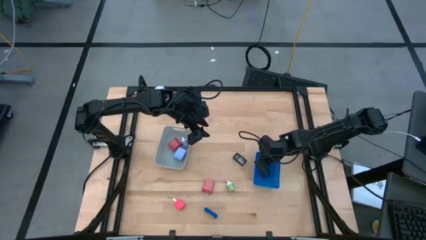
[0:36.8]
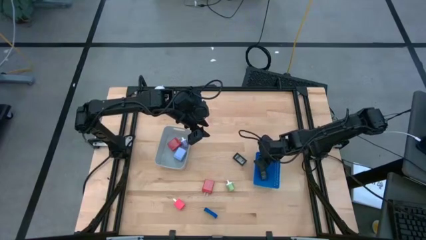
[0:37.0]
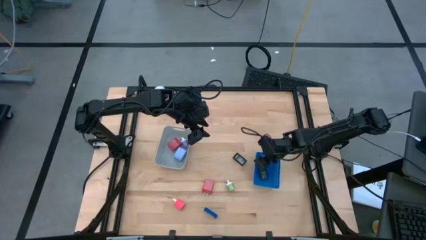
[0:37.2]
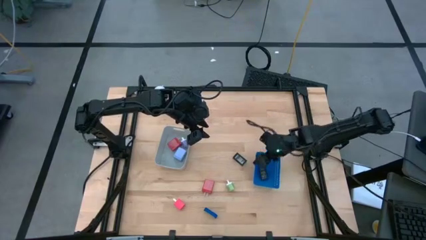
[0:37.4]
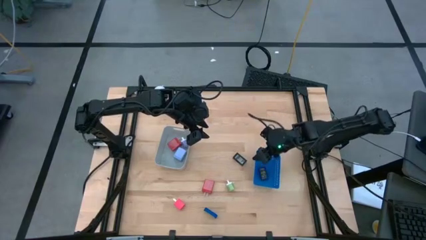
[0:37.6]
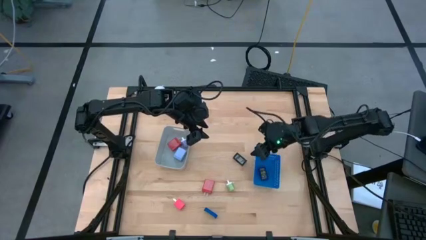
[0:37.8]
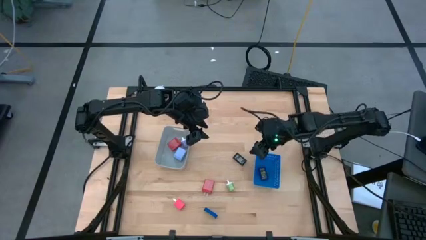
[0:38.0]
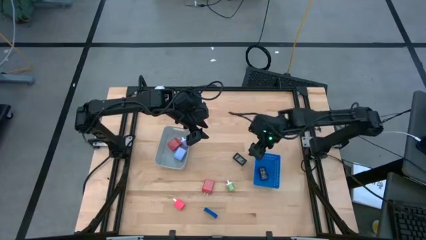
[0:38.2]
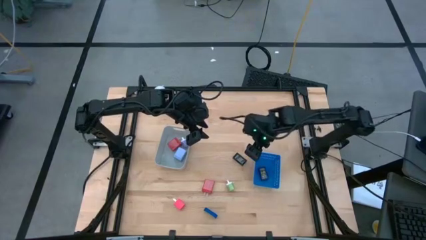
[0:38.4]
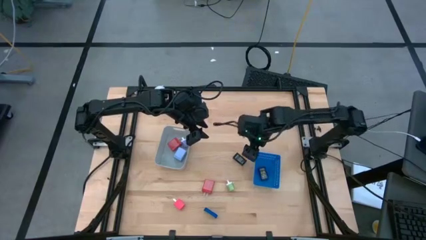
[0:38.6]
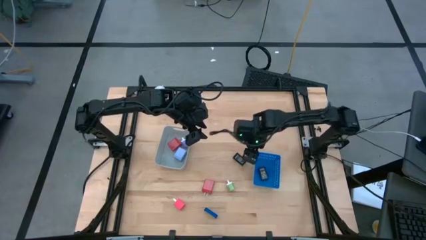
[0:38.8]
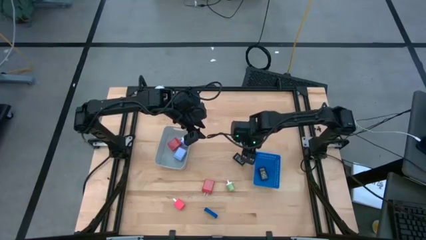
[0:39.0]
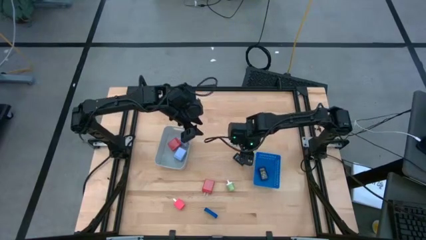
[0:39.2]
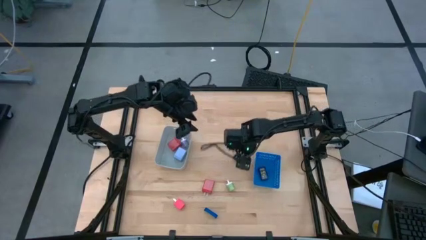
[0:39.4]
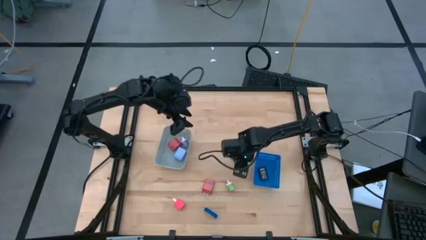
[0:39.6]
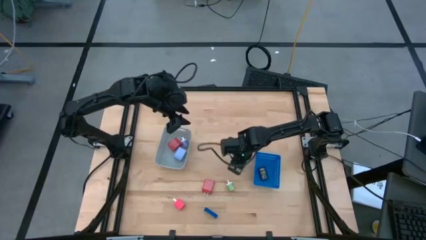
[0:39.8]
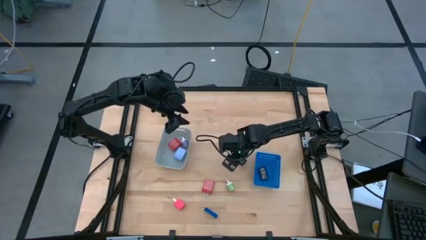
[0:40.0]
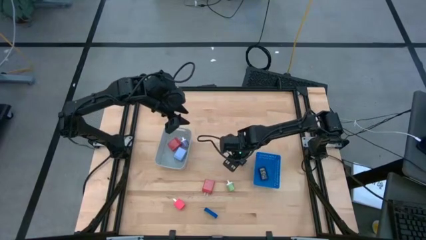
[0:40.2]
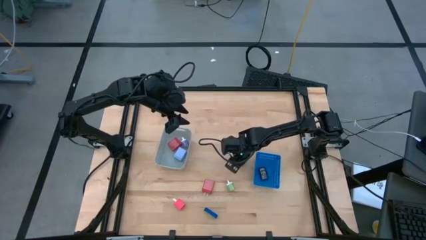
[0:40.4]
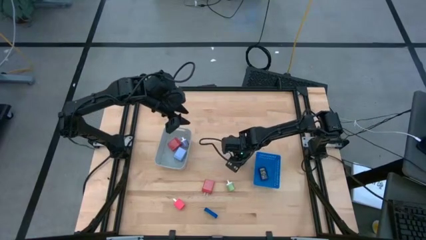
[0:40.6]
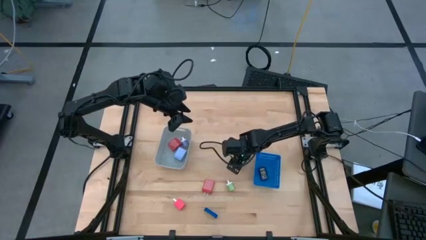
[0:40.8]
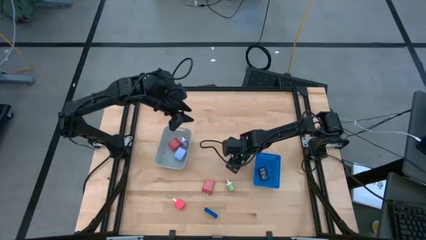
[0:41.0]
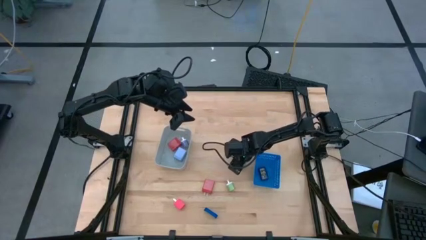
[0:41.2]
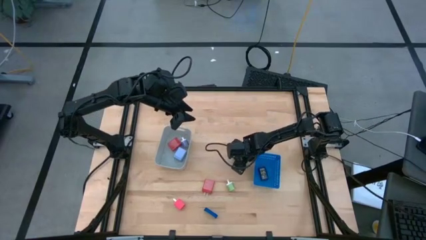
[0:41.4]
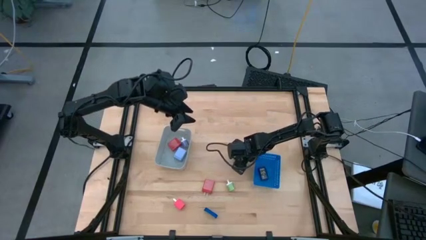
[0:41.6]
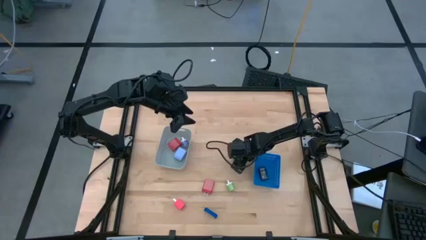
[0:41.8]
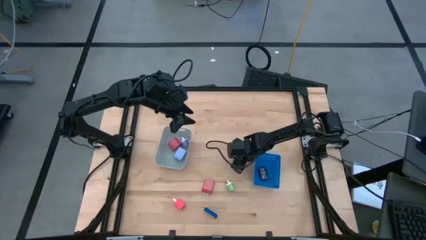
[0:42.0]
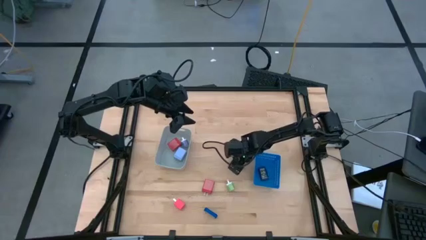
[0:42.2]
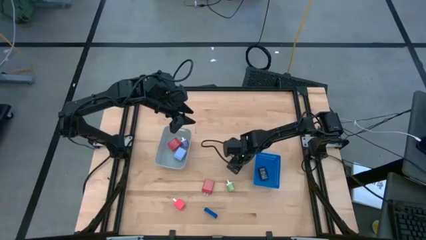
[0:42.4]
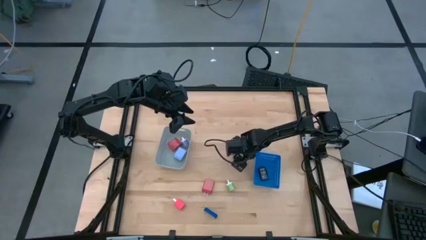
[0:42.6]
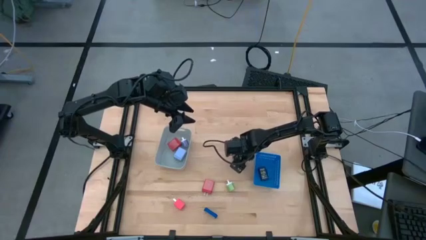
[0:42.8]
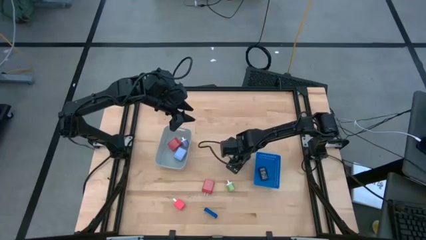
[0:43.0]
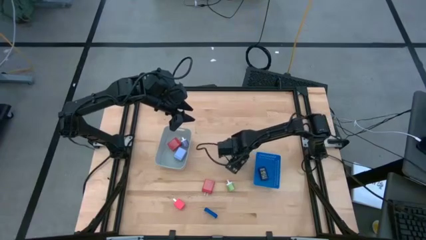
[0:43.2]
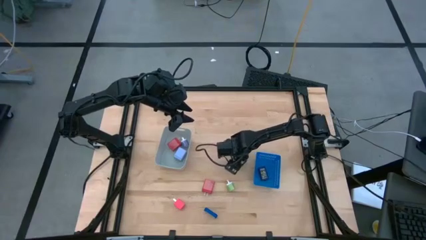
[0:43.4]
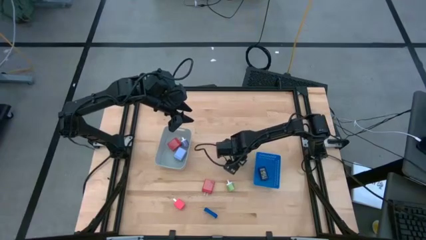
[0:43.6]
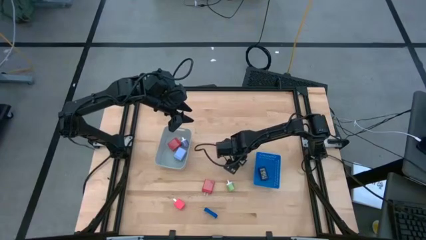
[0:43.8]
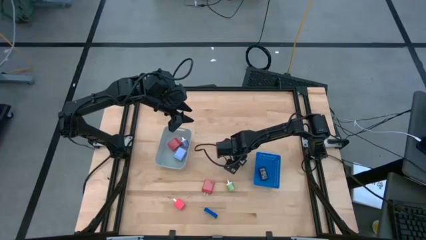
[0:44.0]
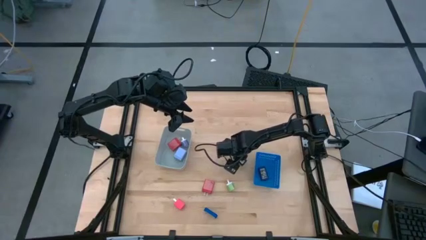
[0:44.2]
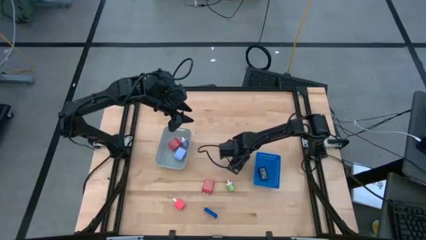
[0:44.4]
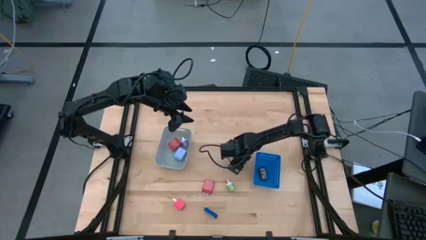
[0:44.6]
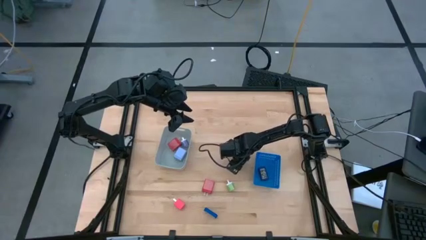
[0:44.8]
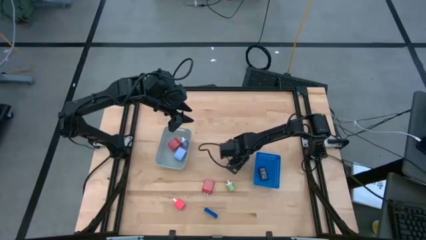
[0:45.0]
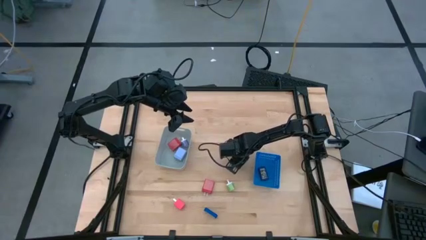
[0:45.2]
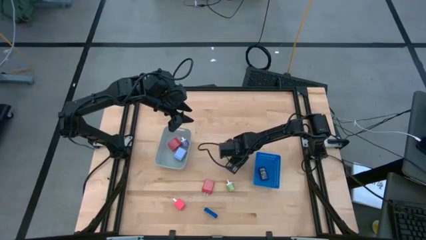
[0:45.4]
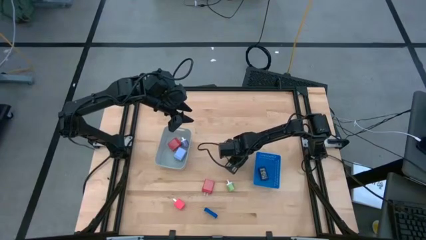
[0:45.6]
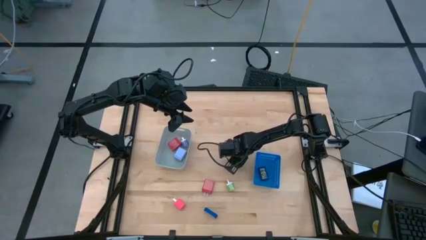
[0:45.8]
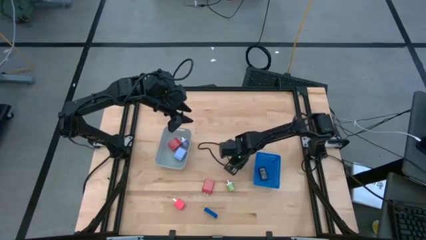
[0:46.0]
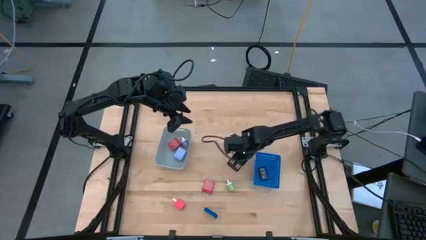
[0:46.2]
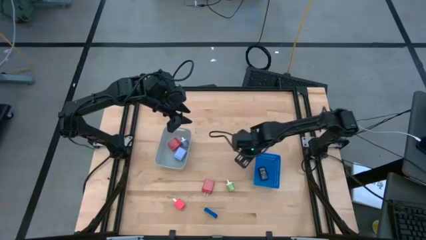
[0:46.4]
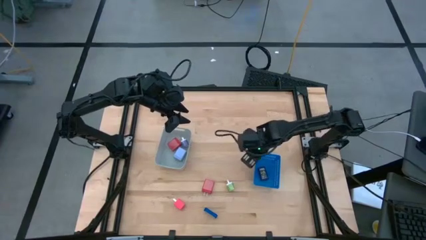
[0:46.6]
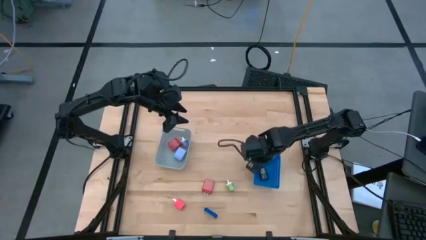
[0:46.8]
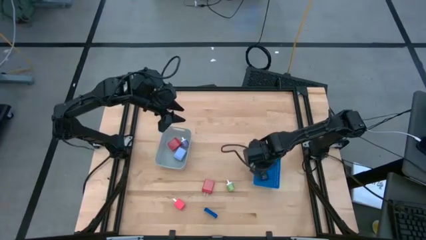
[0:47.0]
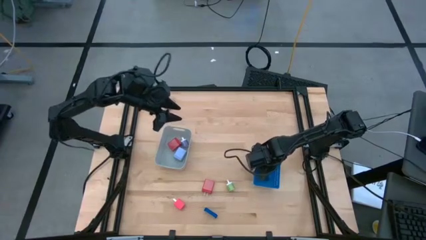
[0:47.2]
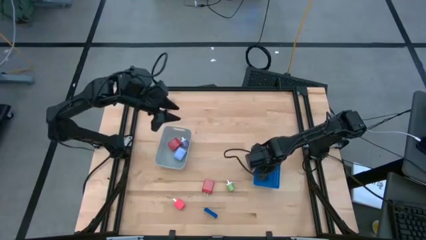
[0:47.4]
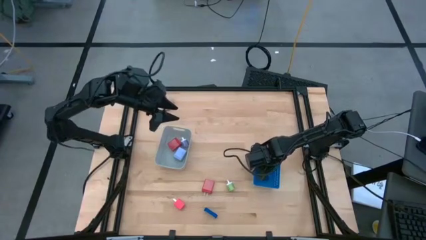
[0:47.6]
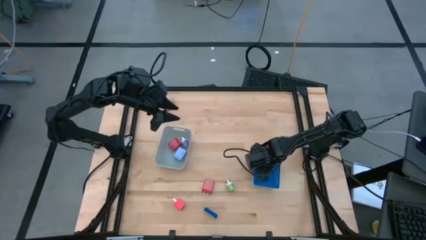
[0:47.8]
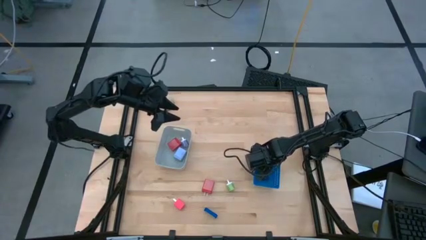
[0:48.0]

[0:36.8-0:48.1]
Task: Pick & Place Office items
Put the black digital clock into the blue bin

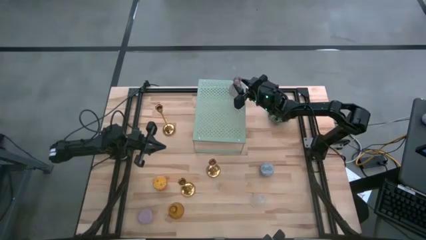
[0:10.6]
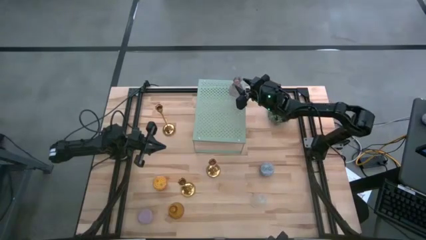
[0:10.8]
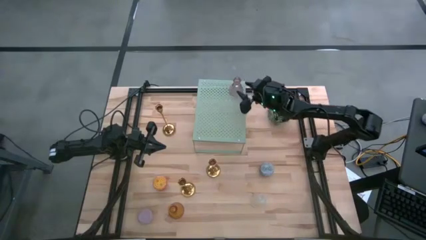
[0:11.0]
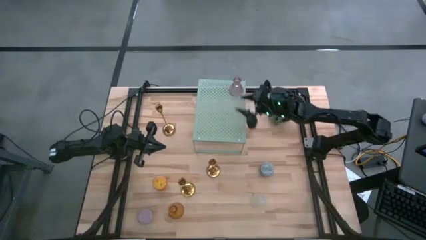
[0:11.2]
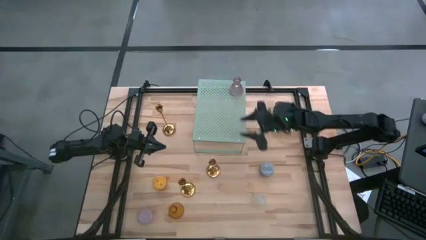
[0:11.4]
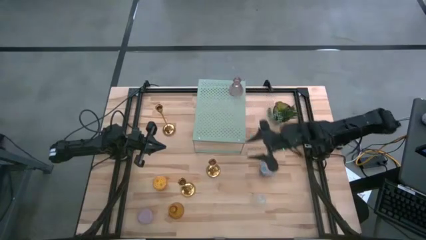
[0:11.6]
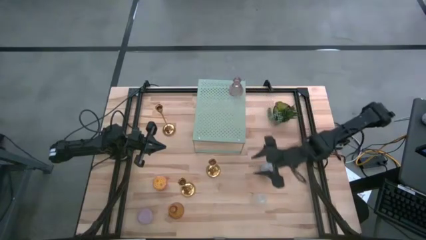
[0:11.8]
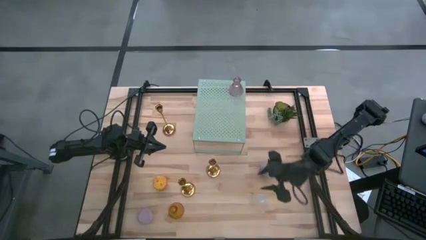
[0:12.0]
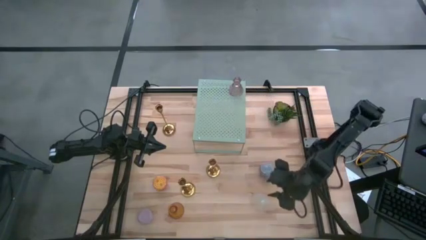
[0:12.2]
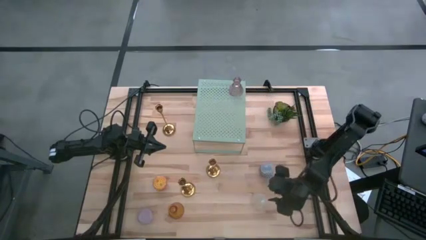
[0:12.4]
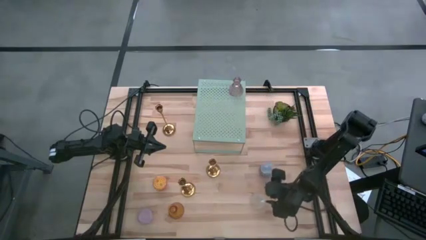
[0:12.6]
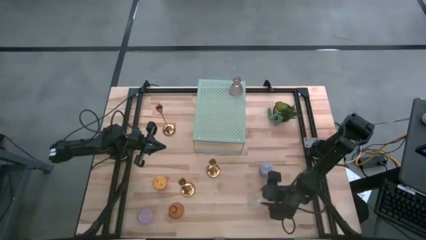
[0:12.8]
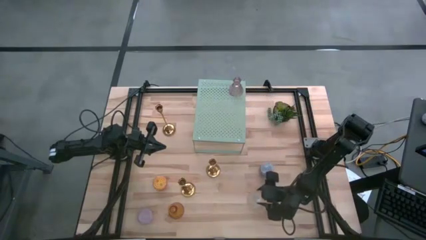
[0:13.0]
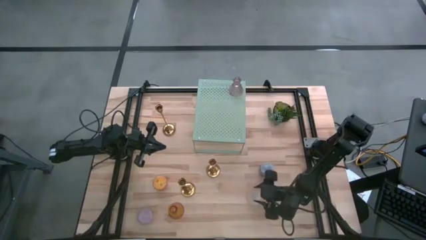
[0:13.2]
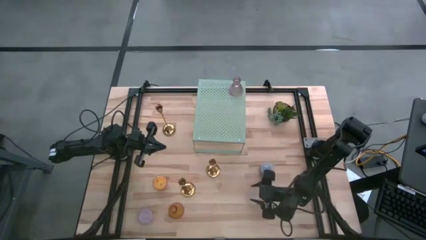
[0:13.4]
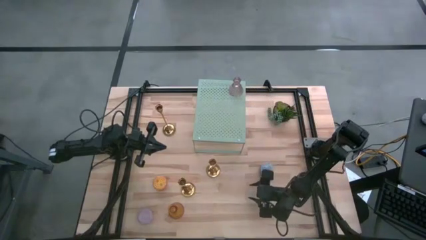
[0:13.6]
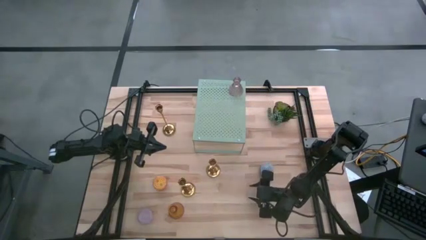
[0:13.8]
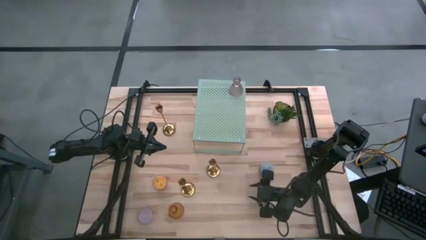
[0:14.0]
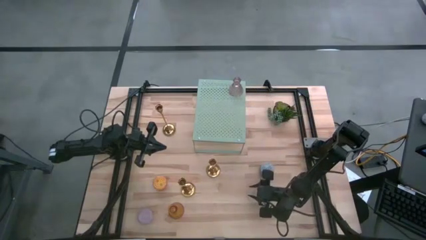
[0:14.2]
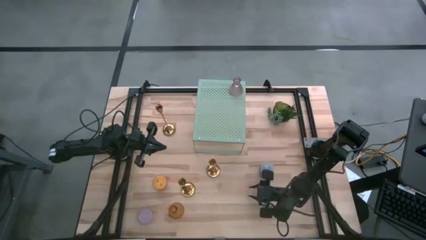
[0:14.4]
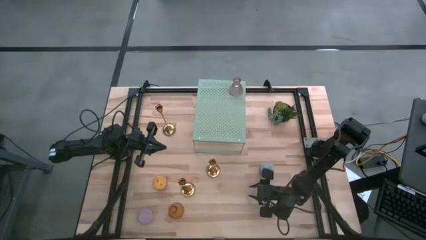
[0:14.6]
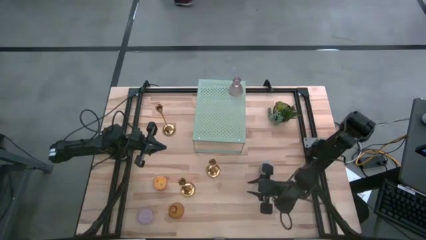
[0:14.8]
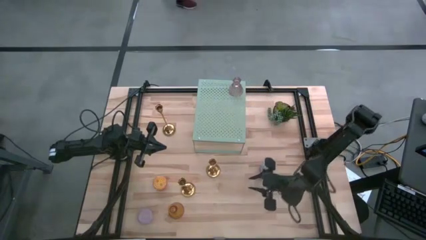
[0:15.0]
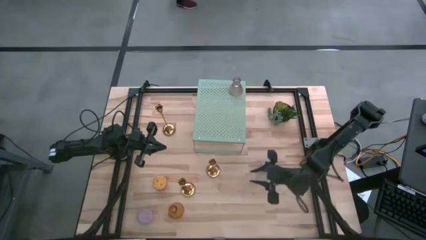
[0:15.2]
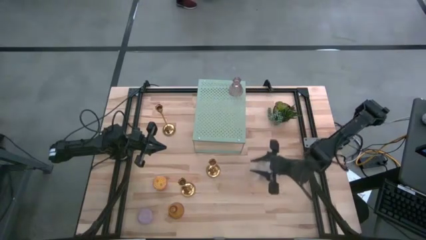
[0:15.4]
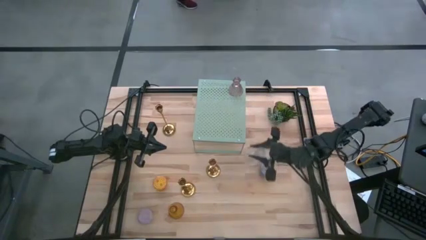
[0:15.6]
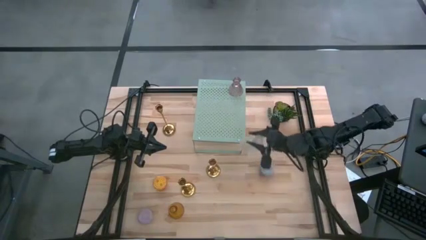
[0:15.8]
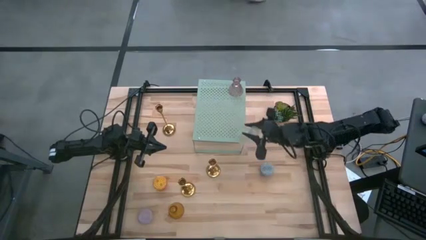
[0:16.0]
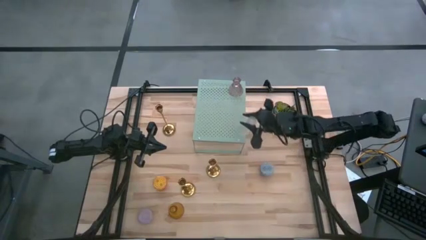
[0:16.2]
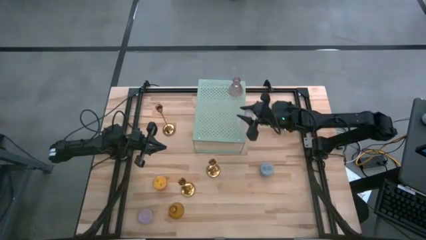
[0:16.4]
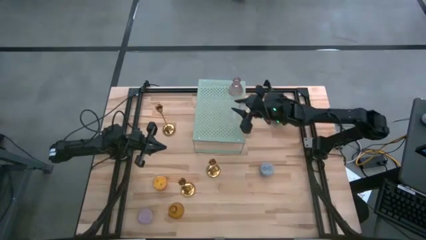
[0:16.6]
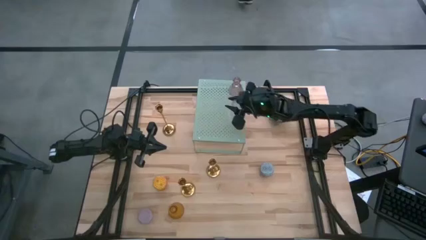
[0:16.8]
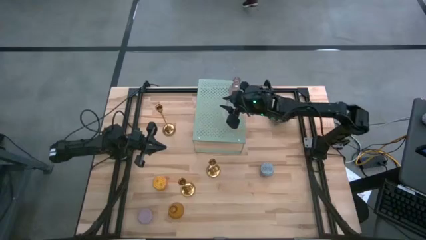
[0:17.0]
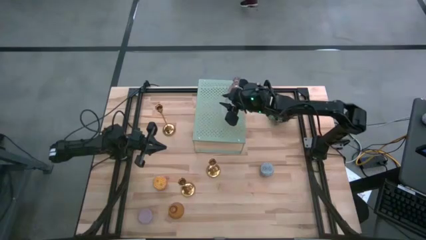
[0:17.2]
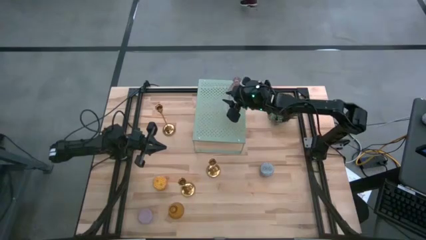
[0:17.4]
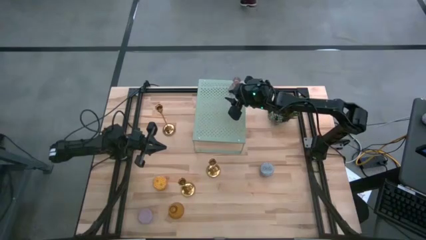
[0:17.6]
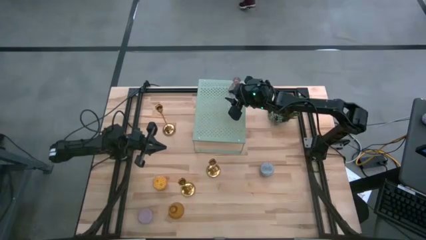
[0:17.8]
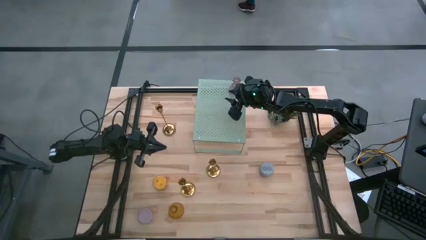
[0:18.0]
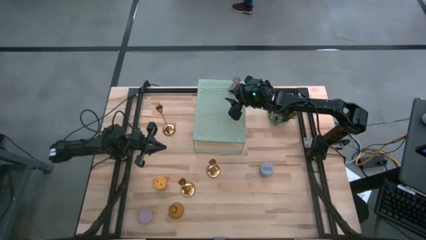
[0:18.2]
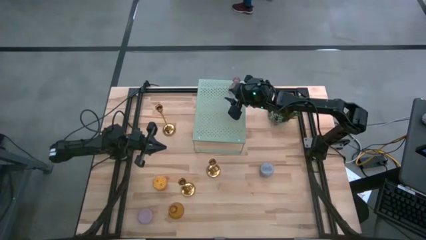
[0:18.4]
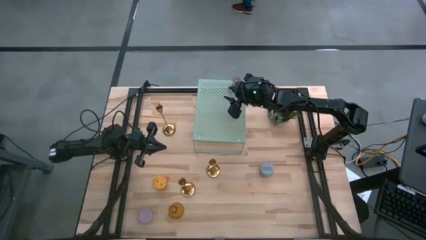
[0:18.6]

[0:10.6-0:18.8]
Task: Stock candles on shelf
Put the transparent candle vase and align it with the other pink candle vase on the shelf
